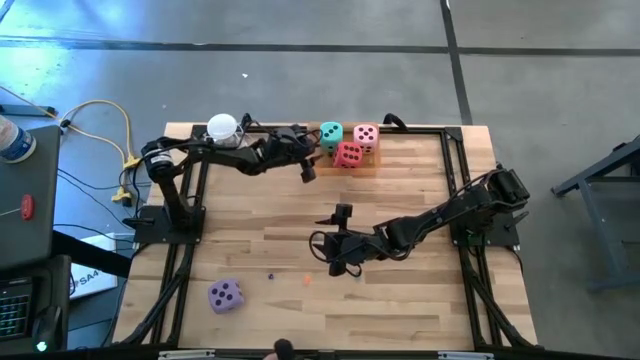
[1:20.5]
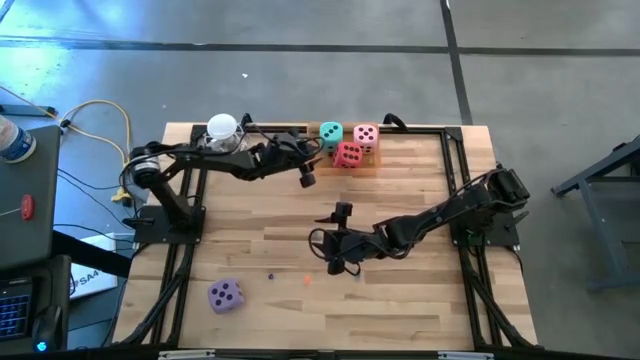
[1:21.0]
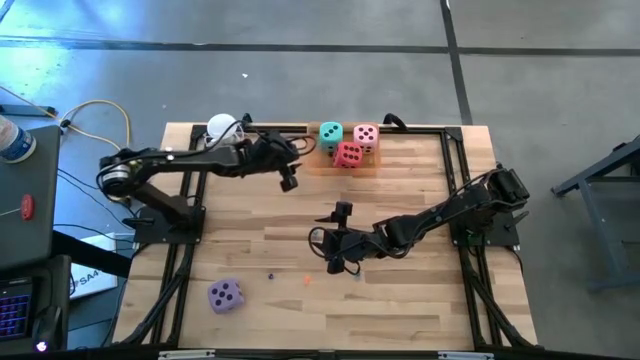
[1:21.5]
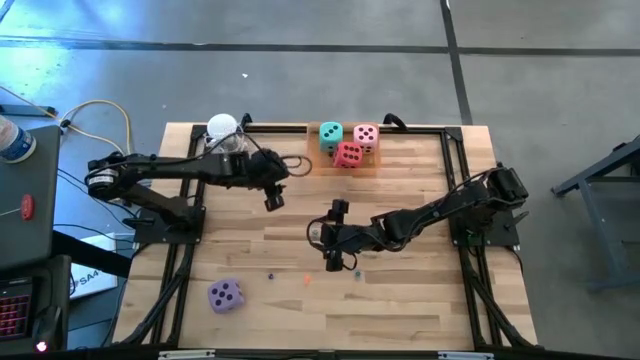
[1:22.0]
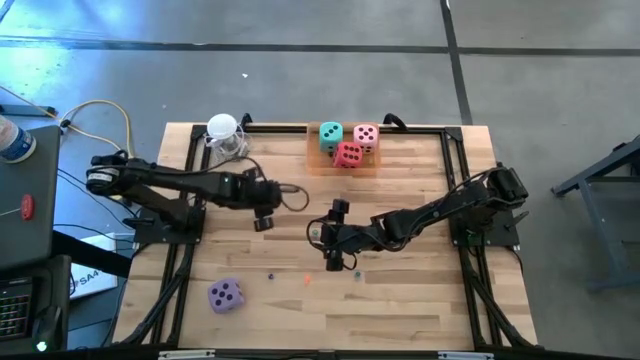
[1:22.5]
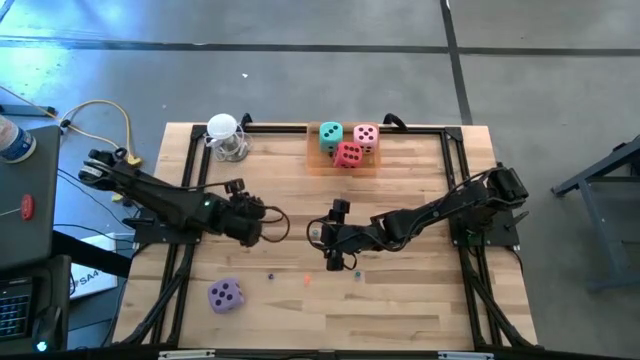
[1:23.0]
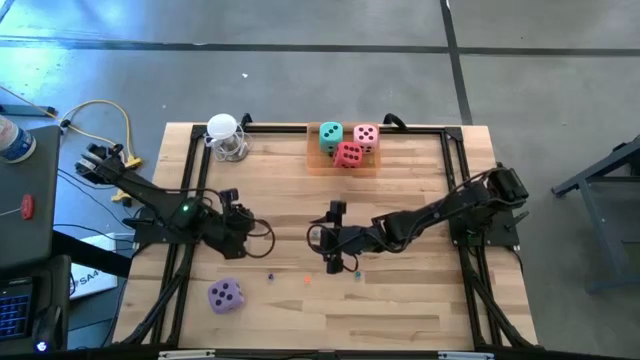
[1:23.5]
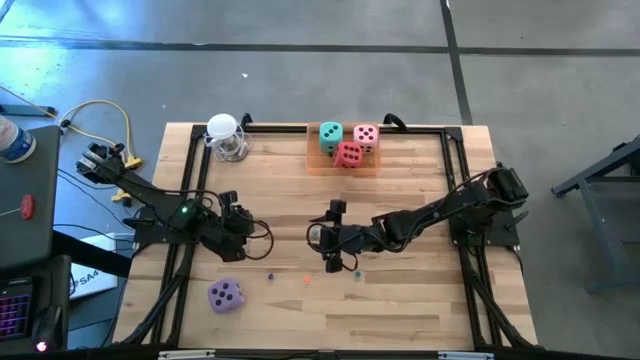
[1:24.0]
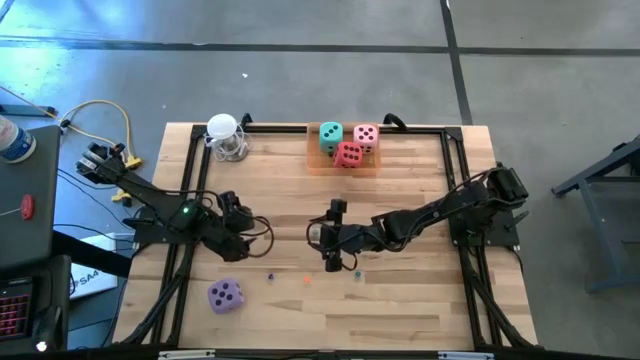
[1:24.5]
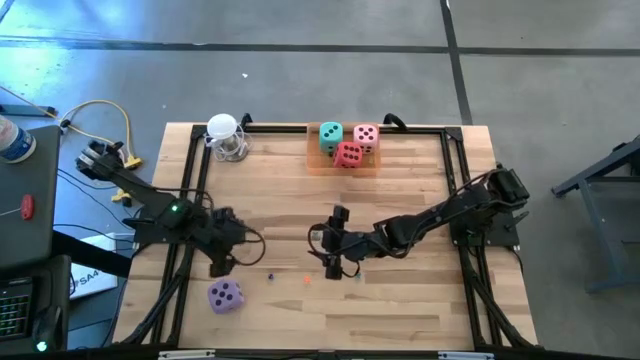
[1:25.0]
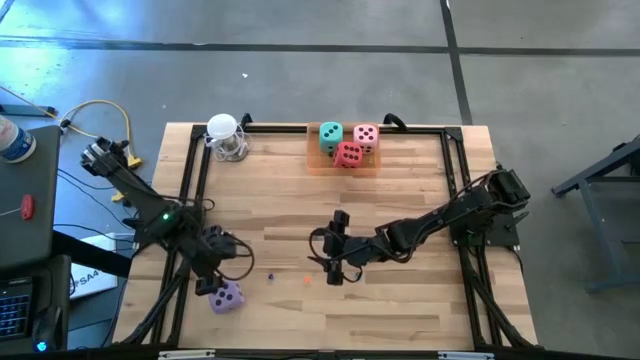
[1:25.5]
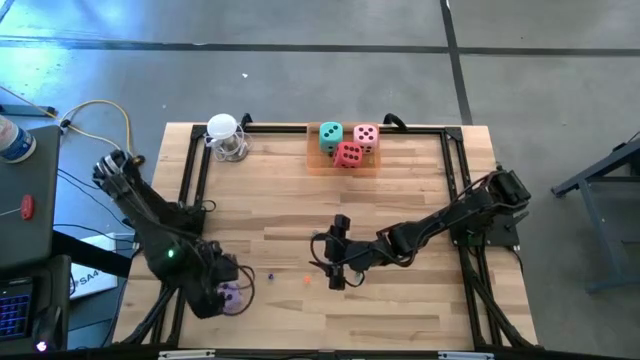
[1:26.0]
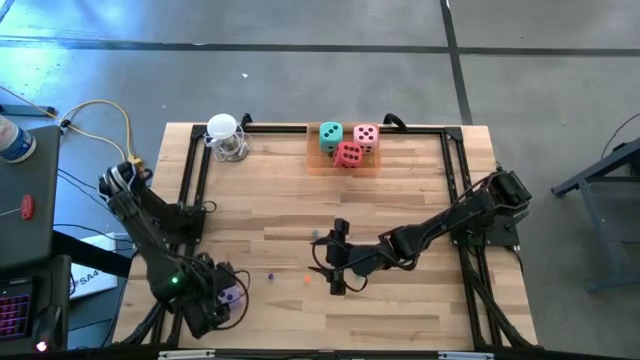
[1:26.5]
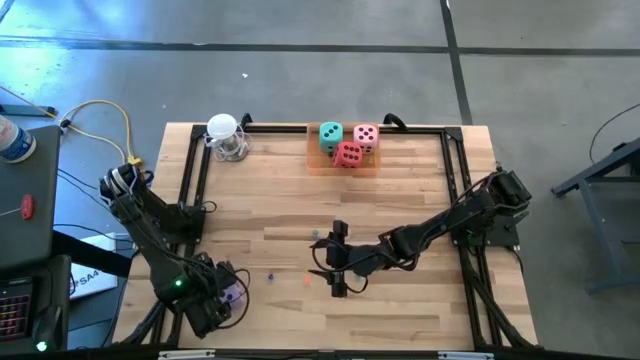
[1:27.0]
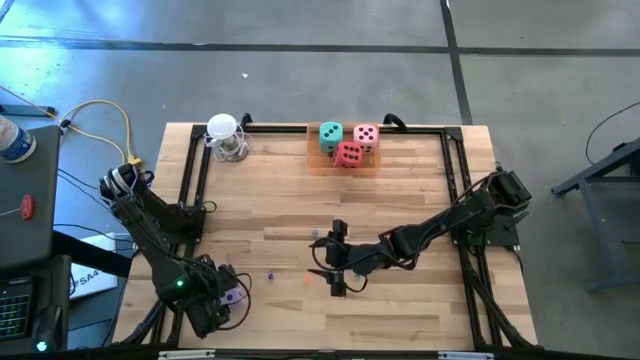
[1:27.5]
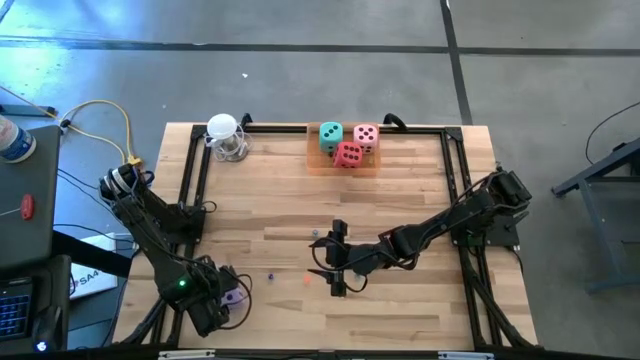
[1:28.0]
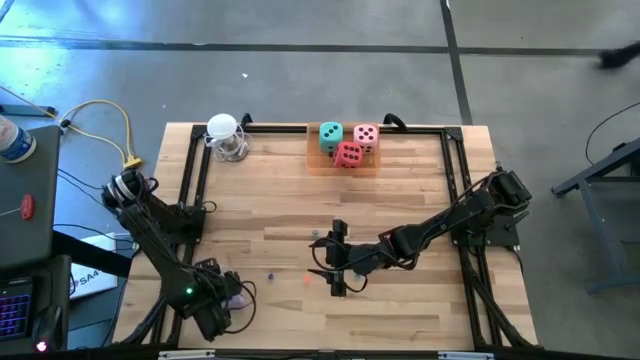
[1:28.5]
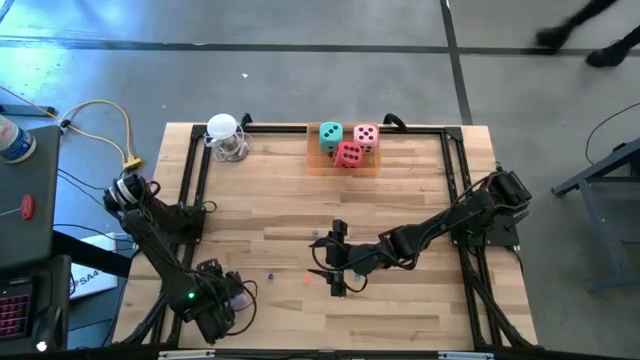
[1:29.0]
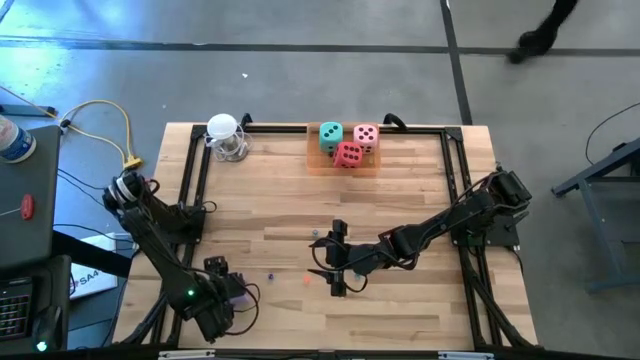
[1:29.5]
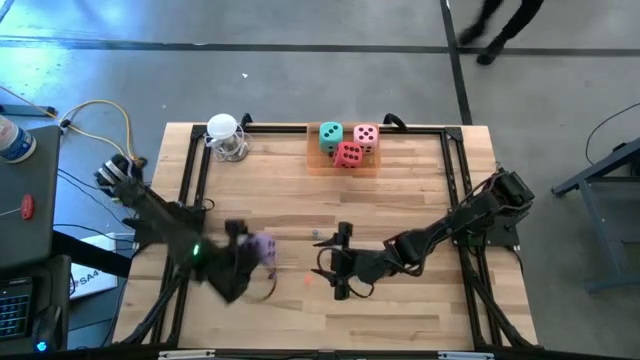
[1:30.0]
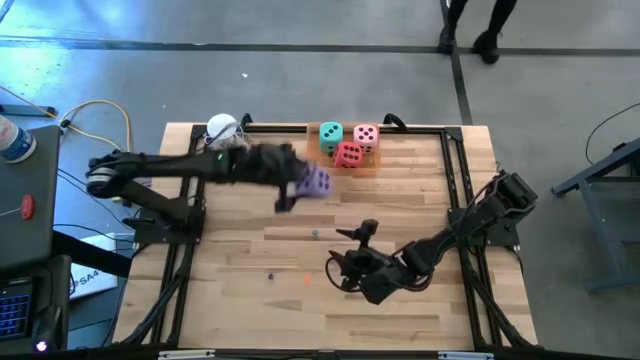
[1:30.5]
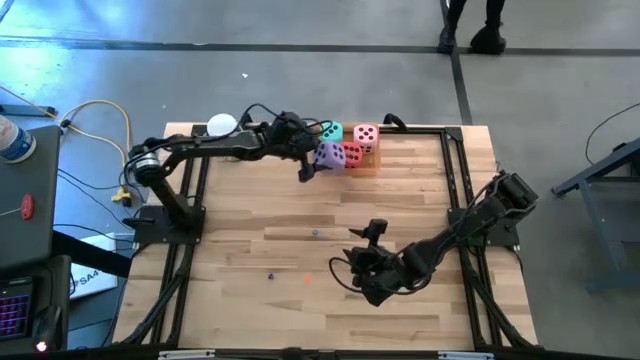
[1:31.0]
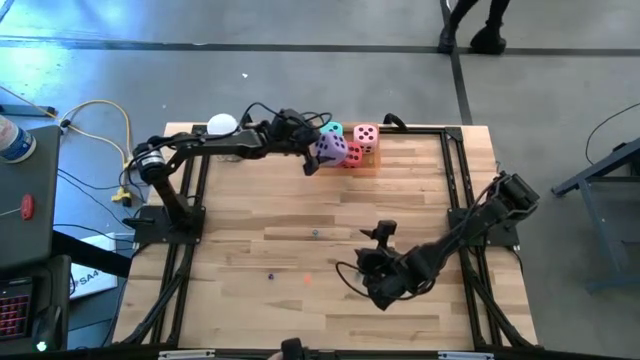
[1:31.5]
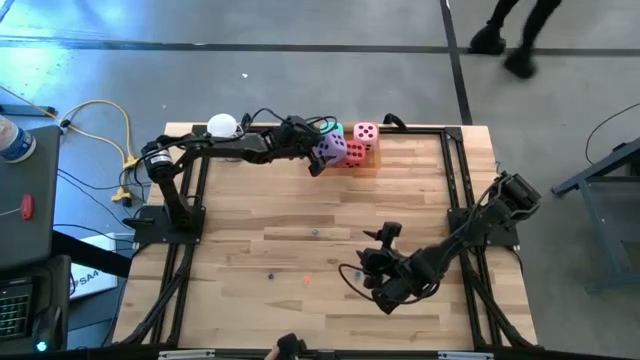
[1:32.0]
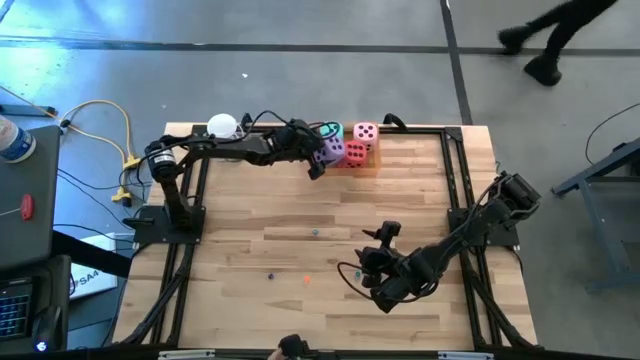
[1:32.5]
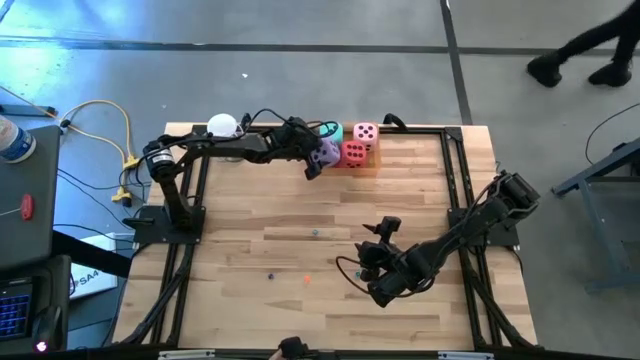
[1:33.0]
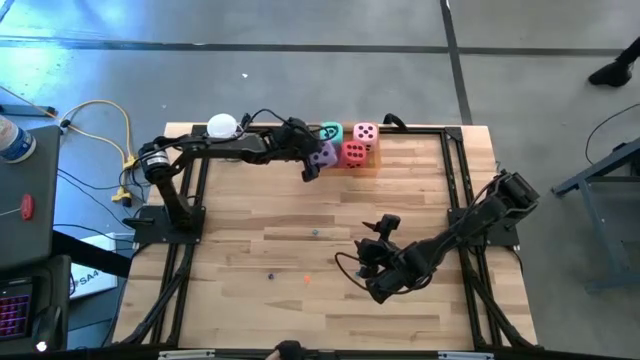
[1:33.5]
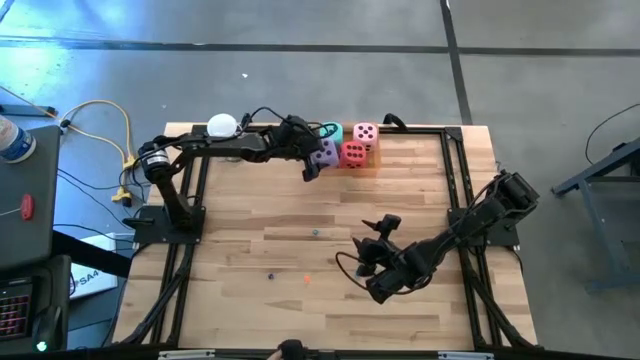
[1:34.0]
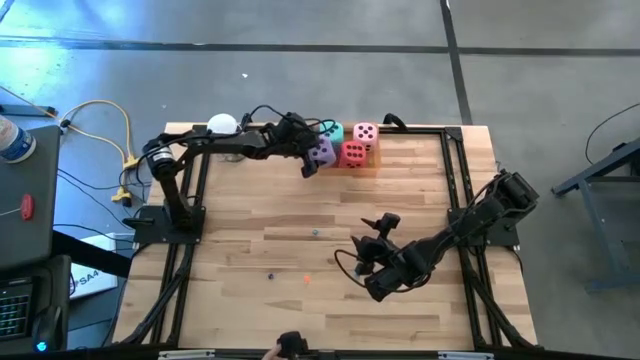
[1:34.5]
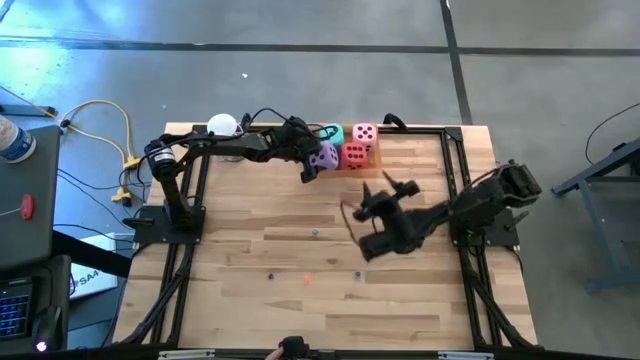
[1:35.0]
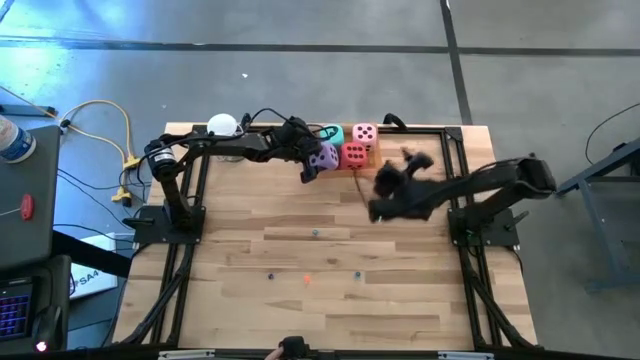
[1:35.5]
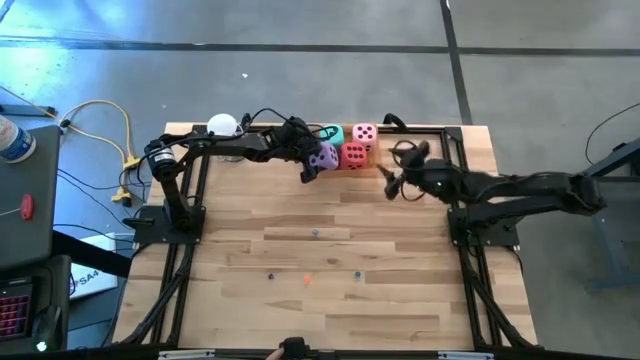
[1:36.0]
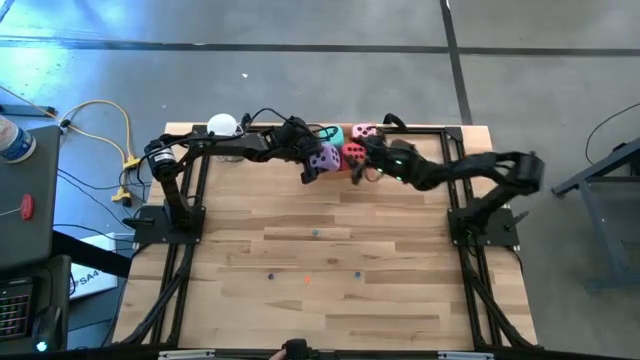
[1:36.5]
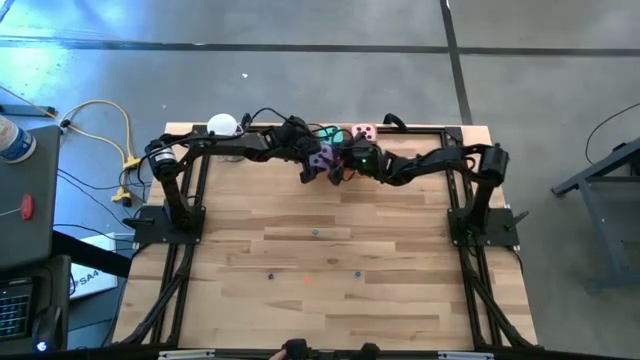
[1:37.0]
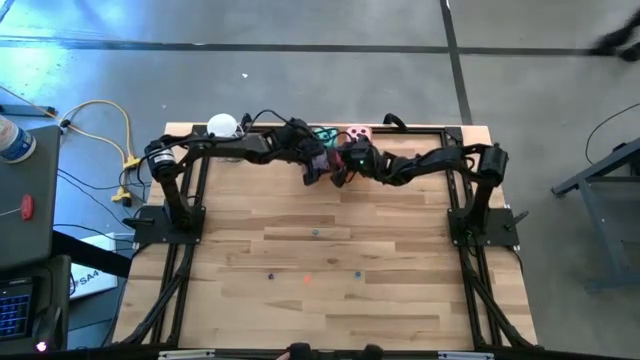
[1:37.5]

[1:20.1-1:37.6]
Task: Pick & Place Dice
Put the large purple die into the orange bin

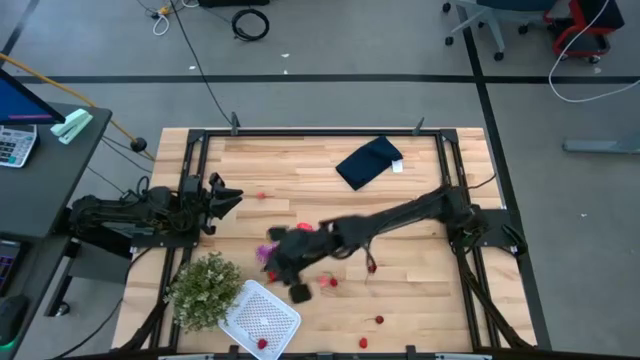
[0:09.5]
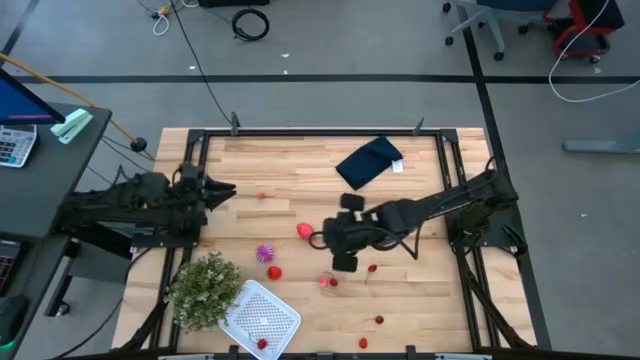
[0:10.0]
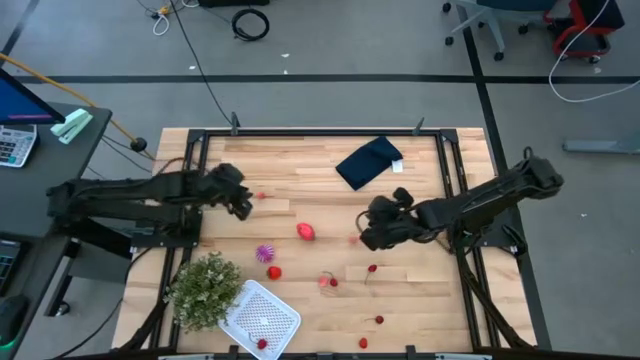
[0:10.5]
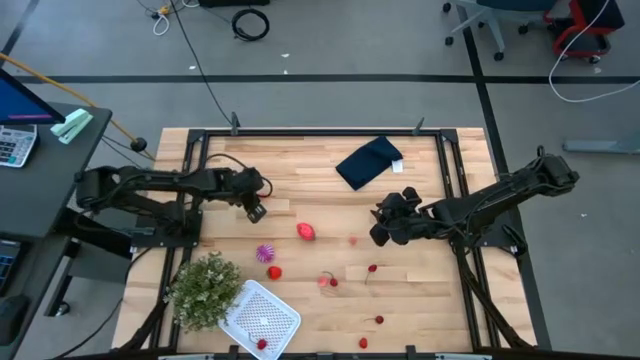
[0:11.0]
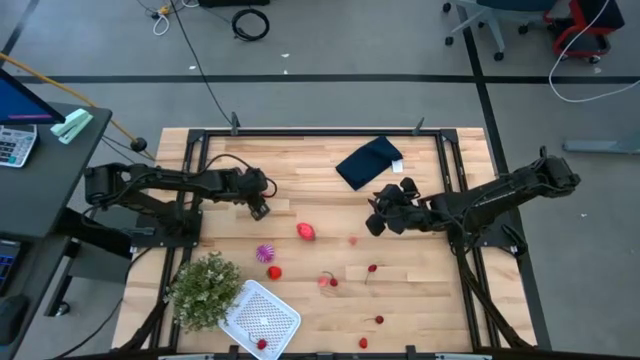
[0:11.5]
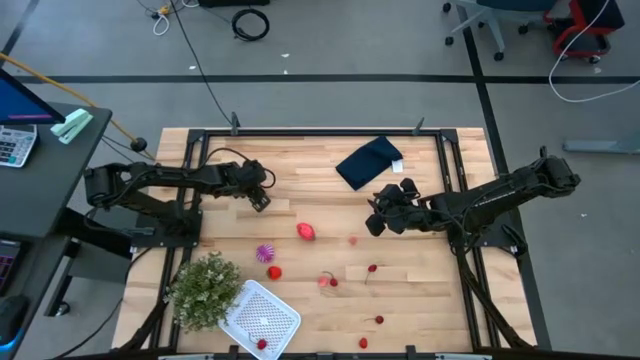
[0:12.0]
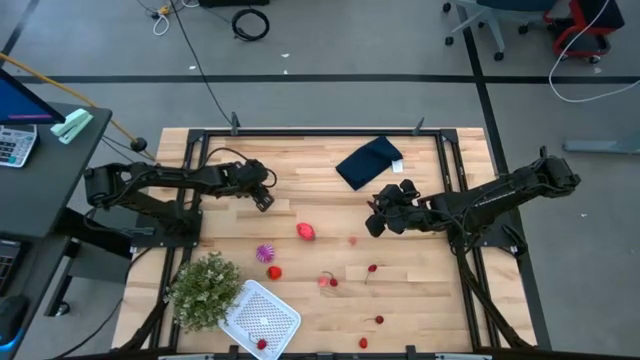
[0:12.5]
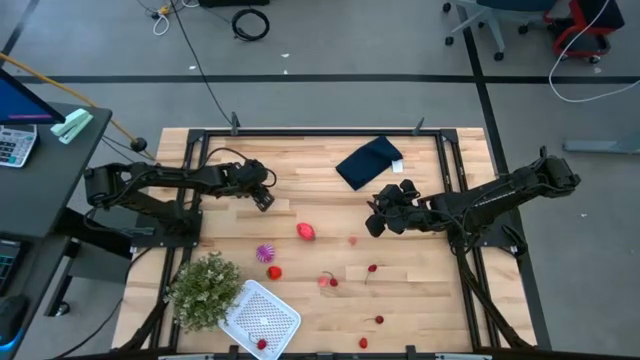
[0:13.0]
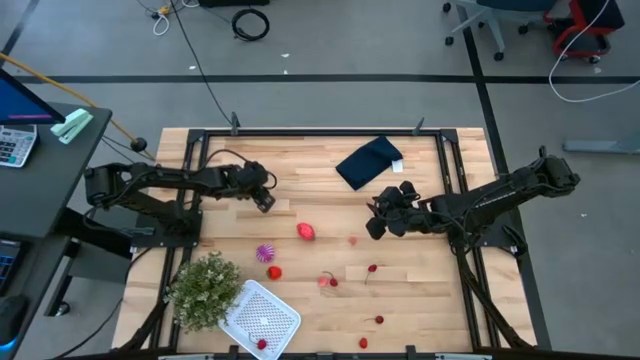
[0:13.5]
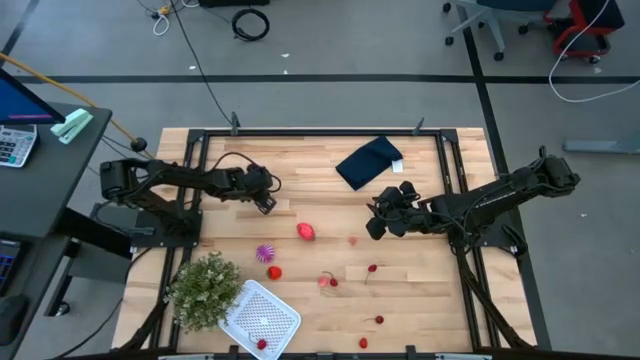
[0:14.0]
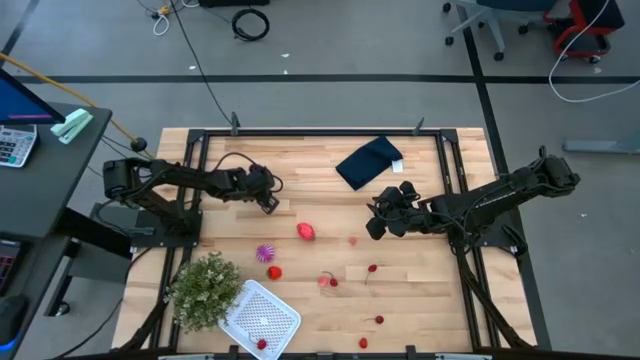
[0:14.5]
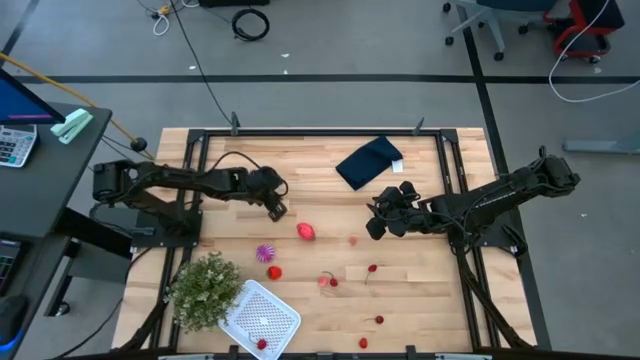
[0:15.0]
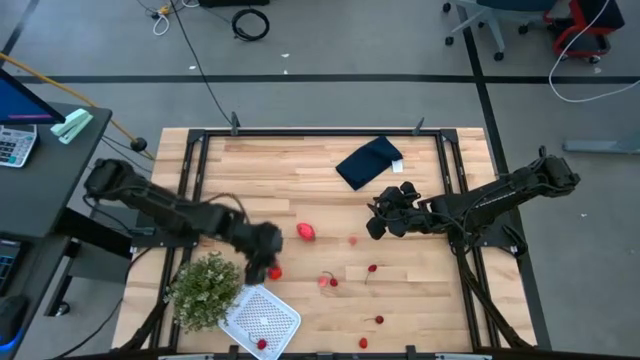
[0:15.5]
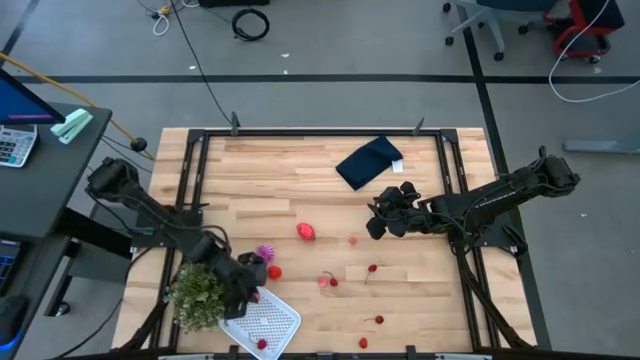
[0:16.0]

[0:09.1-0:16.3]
Task: Pick and placing Produce into tupperware
Put the peach into the white bin
